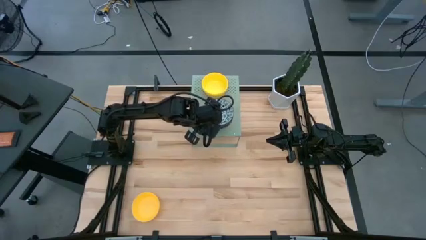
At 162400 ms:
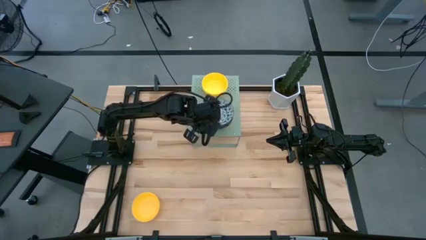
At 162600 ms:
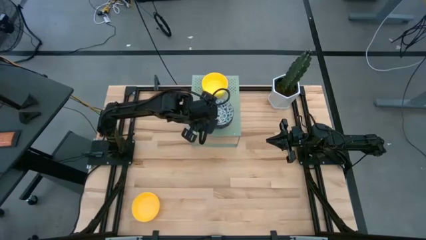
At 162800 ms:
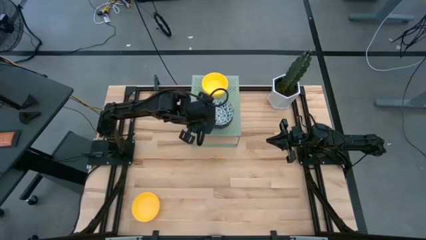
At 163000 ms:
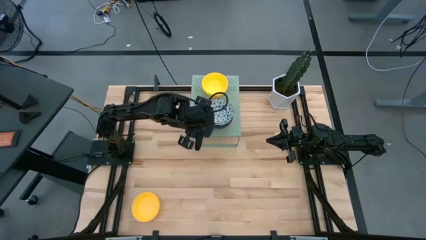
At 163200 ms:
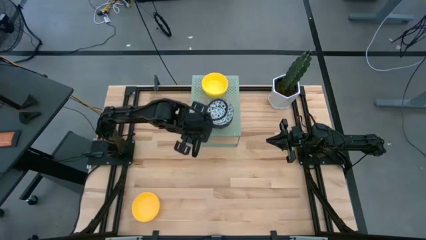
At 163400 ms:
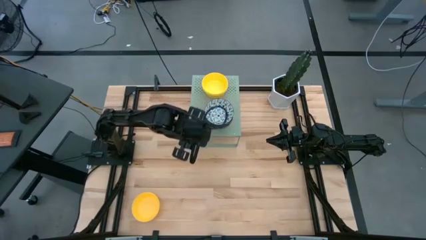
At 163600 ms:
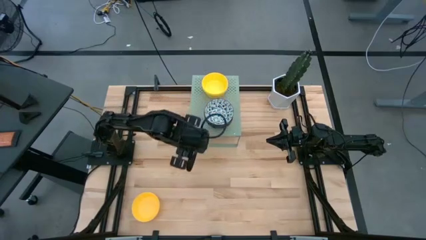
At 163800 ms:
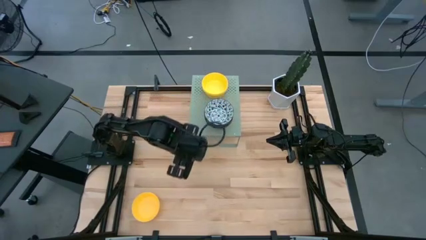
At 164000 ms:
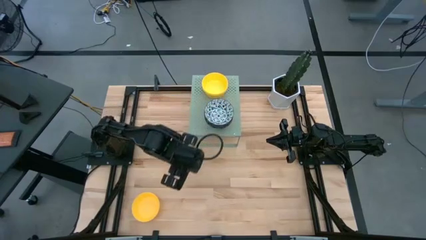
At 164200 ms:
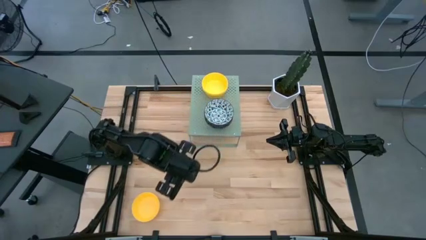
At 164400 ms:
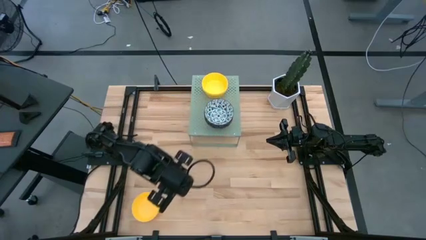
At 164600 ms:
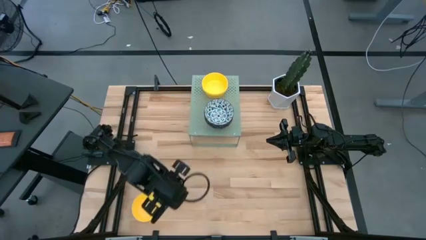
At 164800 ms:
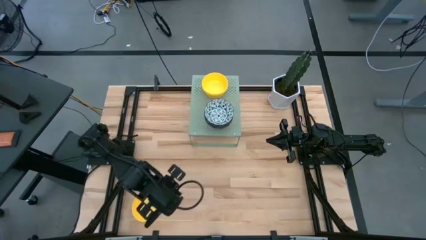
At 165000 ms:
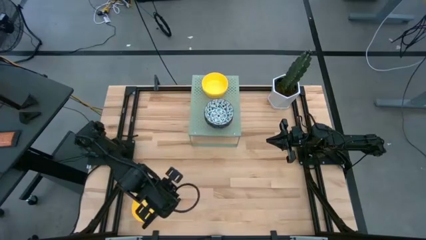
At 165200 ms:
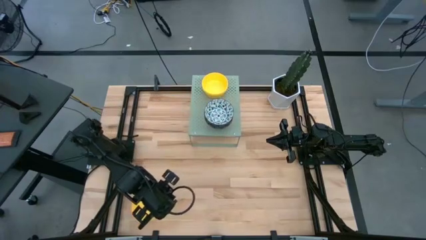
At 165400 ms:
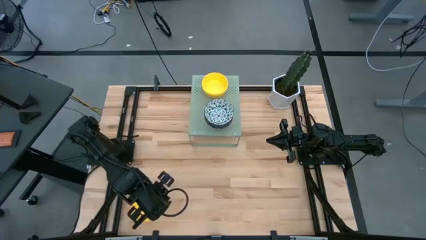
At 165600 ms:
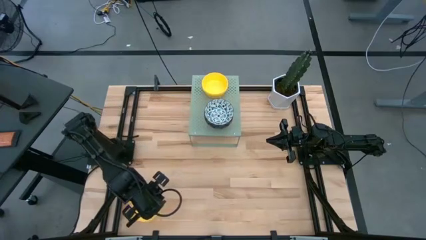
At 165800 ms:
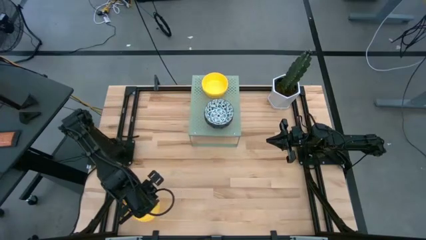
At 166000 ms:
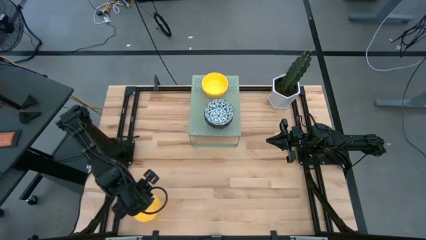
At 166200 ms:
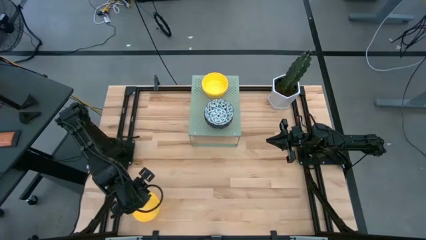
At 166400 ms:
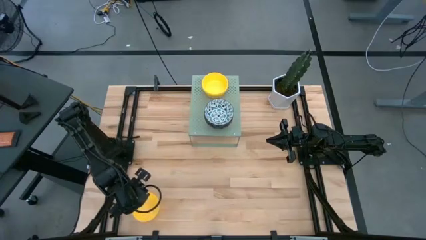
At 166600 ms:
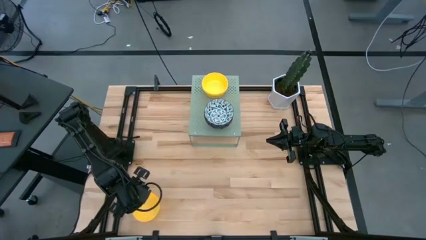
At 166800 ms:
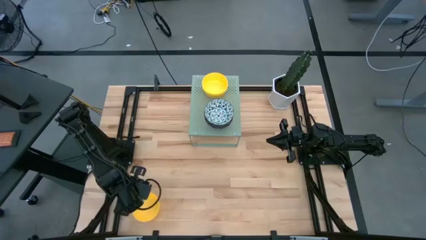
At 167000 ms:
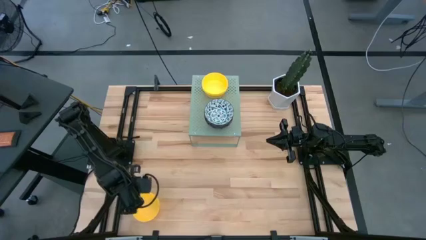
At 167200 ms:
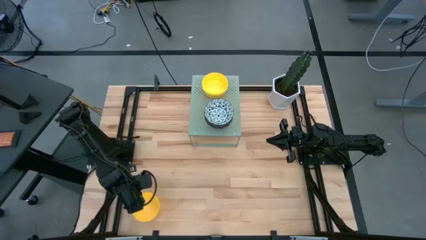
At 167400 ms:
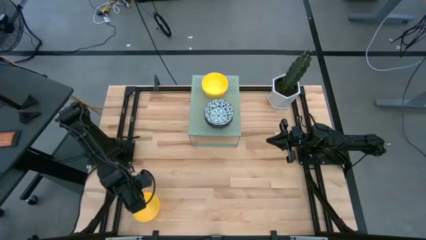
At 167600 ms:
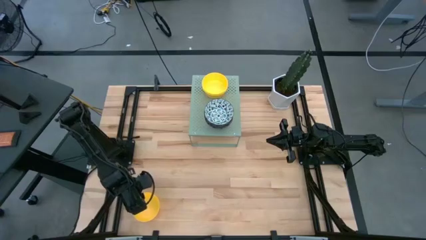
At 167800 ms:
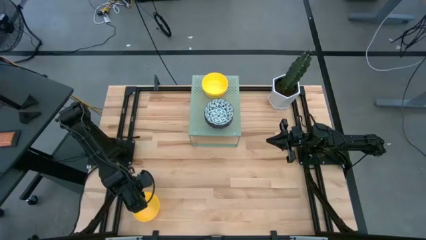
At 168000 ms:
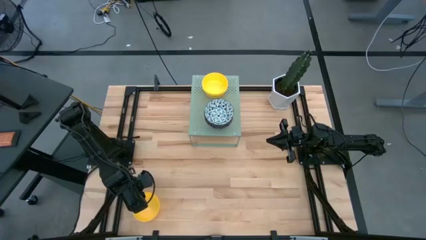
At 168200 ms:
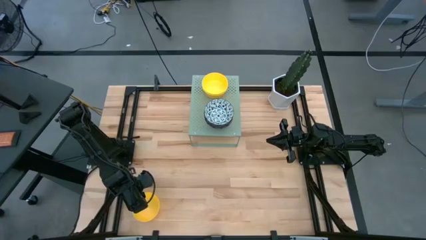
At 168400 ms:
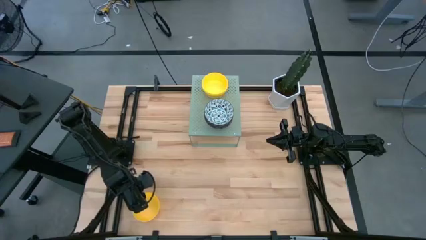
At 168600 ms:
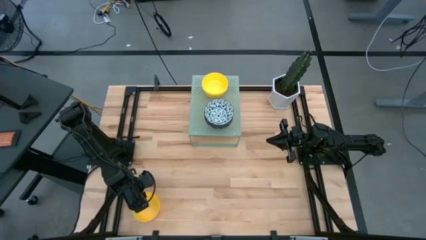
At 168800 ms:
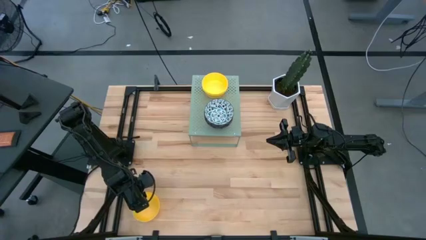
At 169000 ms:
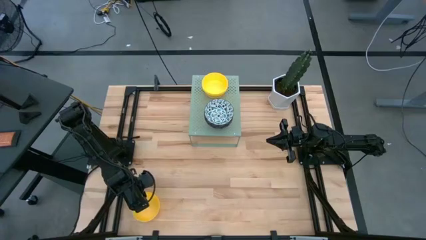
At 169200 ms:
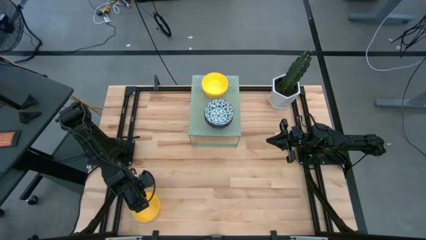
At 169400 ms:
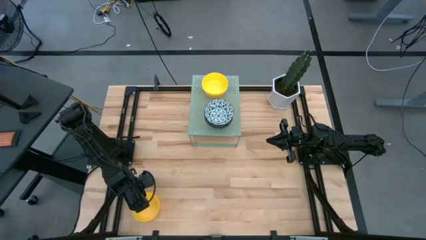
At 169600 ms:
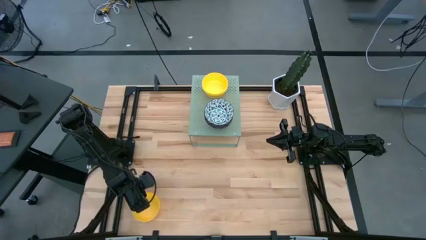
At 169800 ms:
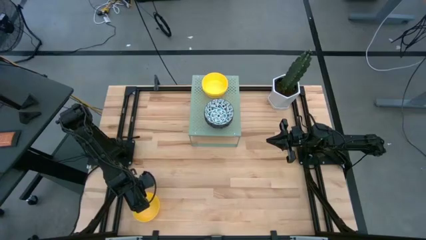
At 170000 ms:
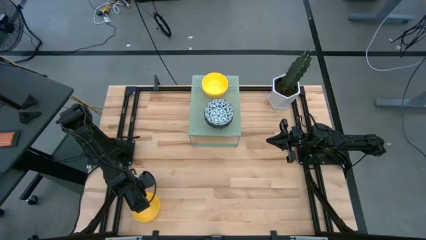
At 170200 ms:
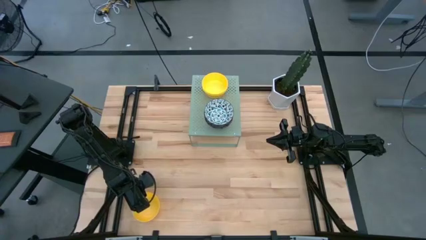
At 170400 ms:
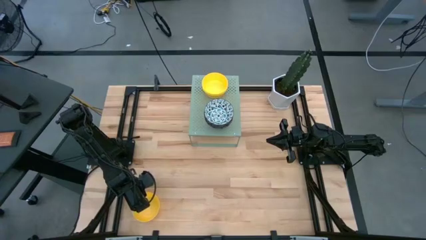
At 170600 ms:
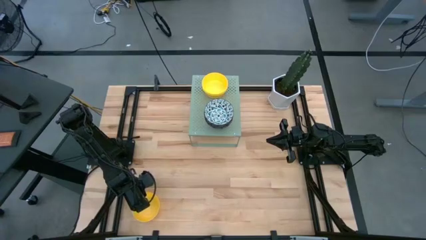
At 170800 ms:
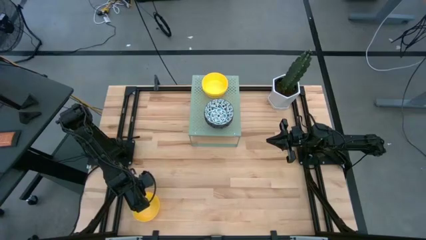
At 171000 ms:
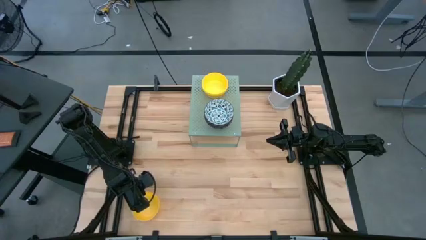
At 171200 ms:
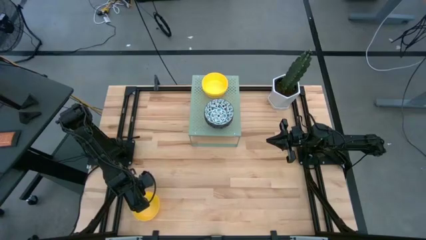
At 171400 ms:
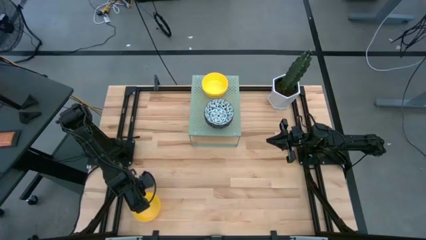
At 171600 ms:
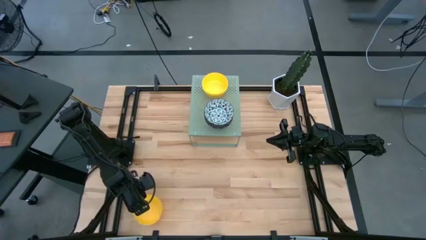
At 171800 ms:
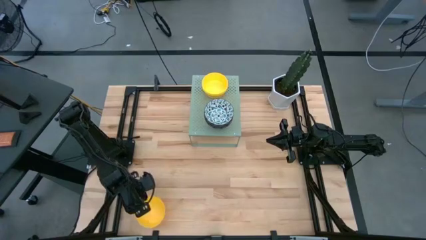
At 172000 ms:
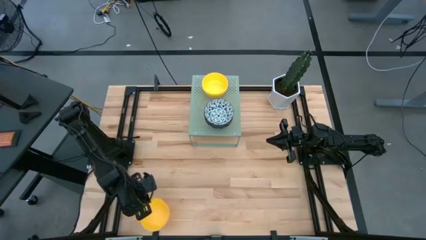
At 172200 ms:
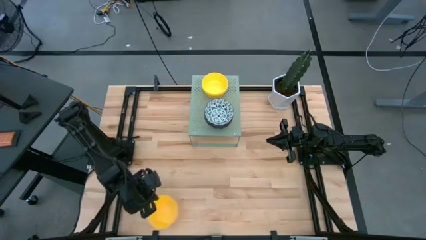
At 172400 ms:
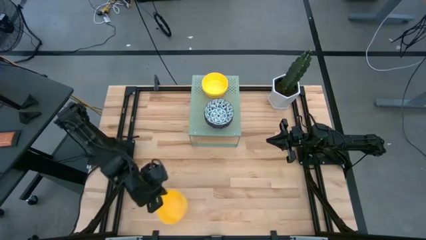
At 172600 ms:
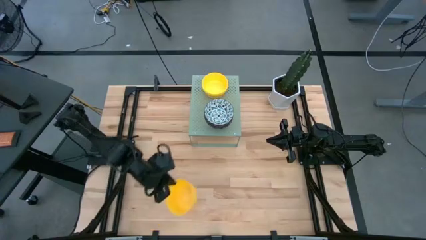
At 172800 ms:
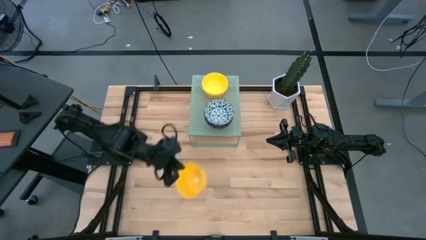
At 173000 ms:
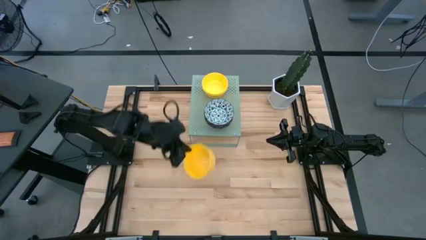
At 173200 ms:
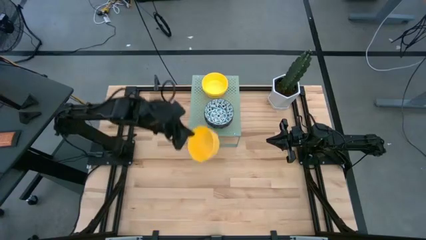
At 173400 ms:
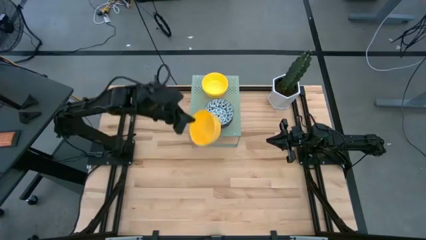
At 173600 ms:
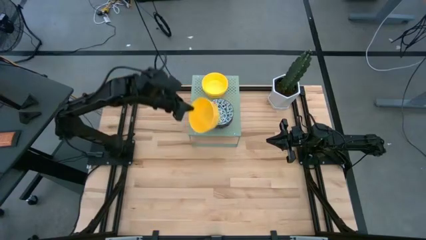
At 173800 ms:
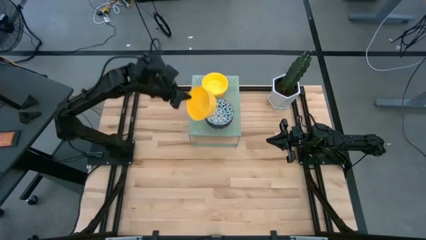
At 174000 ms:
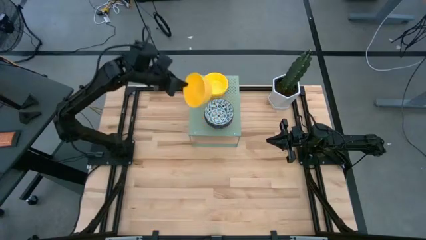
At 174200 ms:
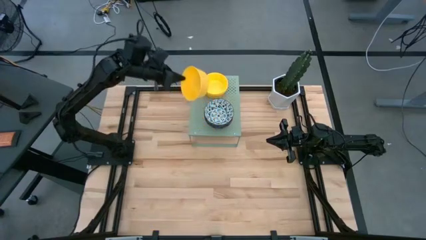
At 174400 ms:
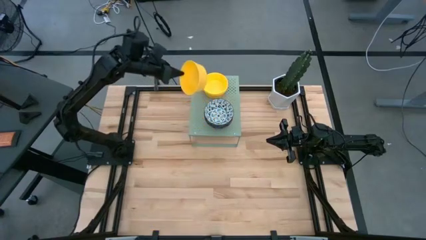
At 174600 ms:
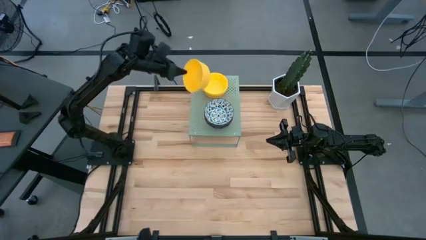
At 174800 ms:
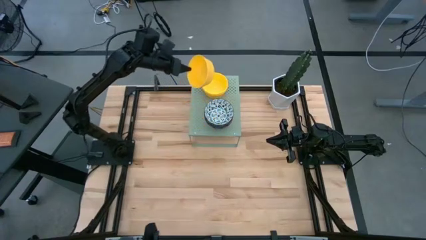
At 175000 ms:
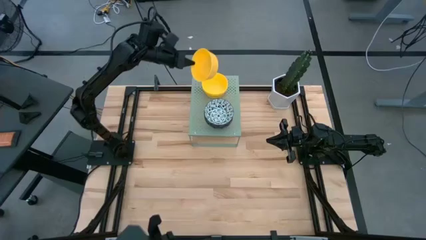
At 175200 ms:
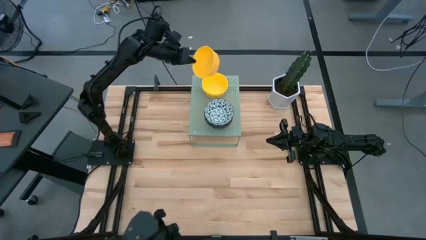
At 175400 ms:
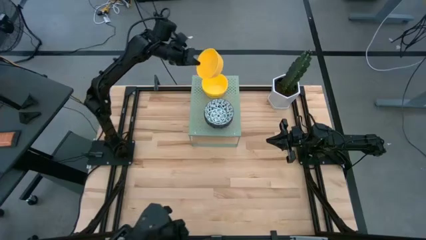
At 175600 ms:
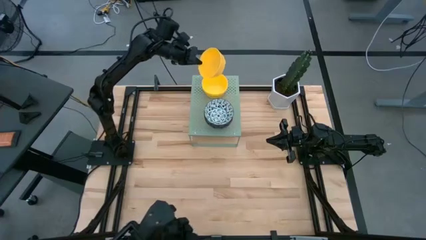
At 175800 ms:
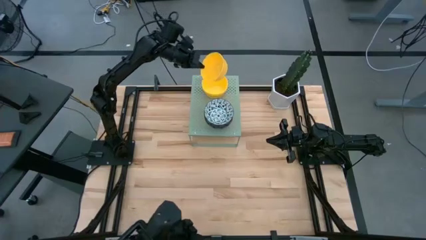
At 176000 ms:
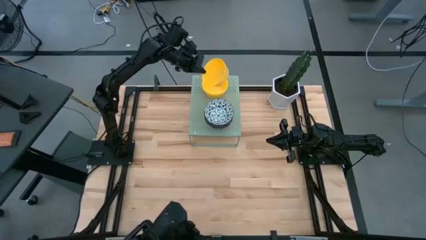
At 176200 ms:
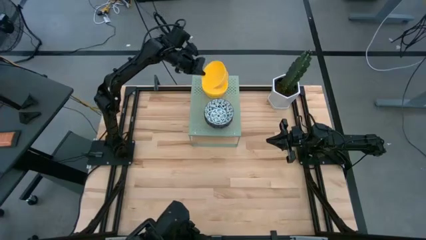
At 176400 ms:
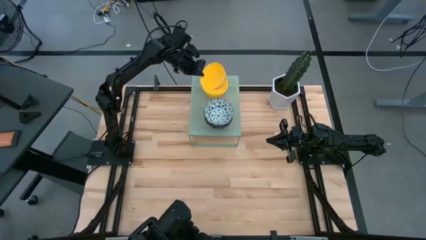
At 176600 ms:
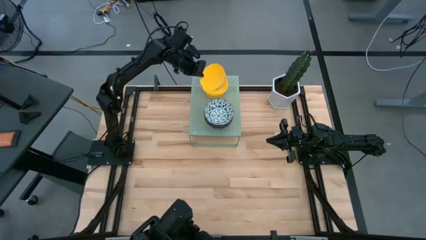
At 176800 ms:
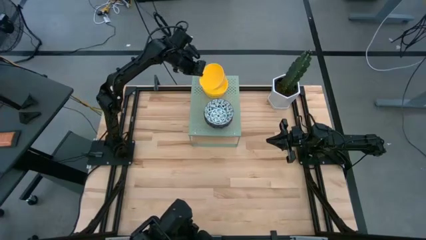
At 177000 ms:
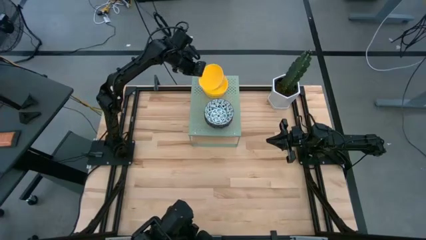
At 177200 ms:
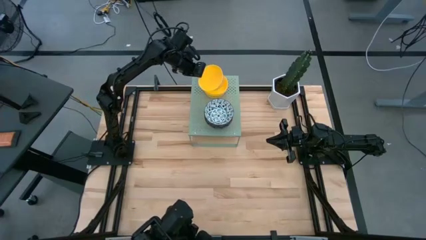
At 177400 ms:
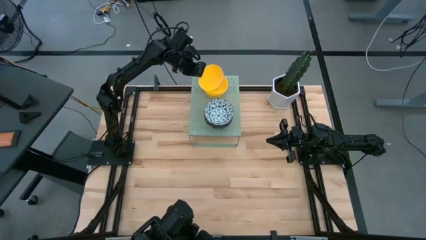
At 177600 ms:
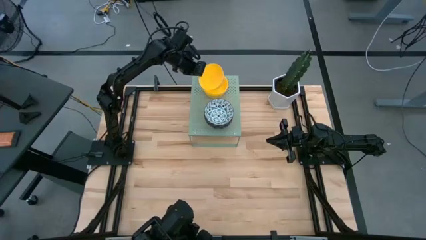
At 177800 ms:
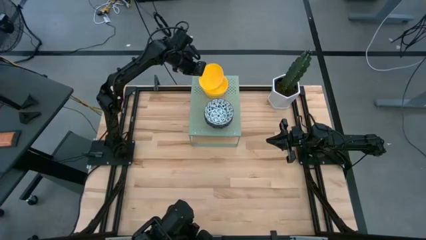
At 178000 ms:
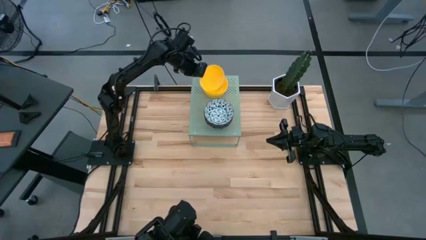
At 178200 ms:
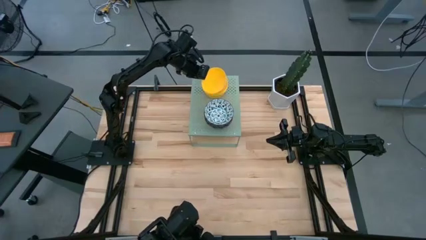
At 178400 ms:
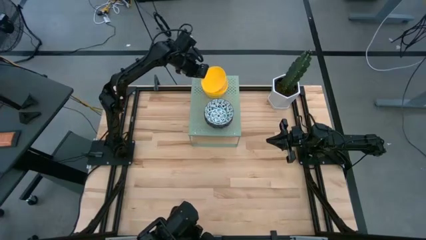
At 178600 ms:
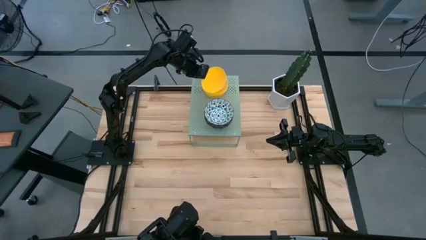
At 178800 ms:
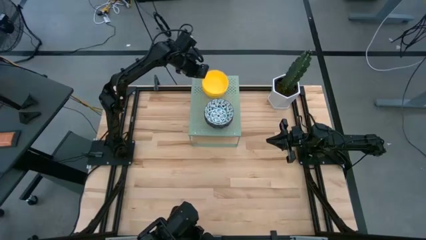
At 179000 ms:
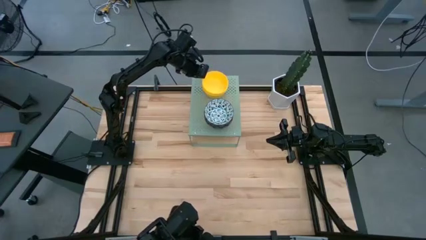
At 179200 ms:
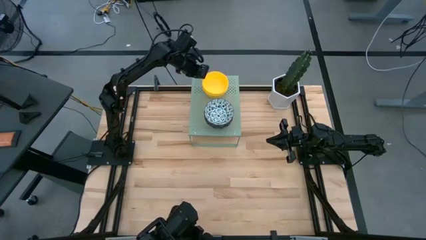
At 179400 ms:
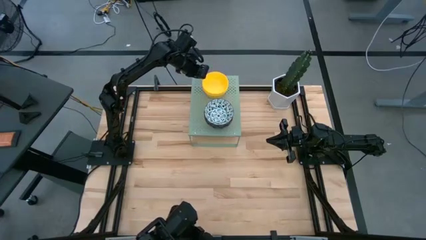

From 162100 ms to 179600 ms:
Task: Pick & Place Mini bowls
Stack the yellow bowl on top of the other yellow bowls on the shelf
